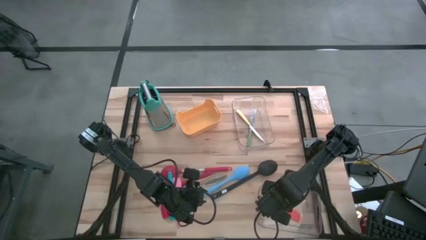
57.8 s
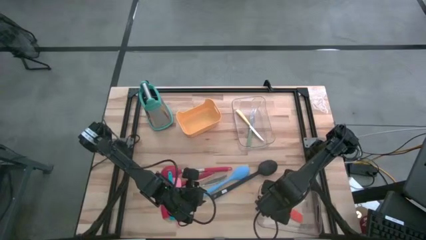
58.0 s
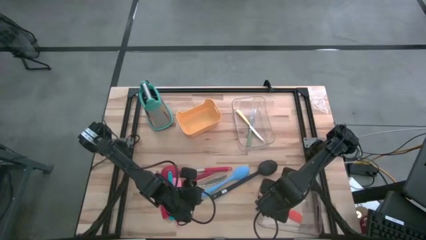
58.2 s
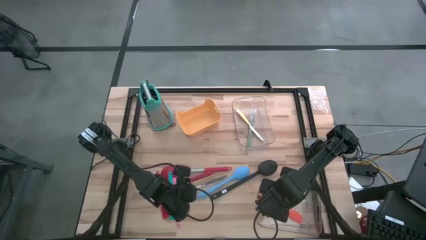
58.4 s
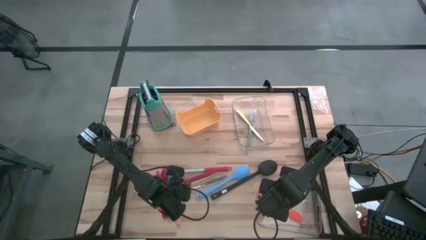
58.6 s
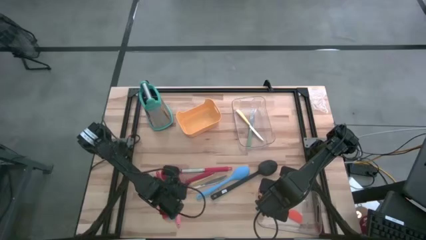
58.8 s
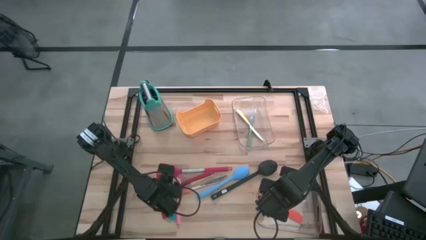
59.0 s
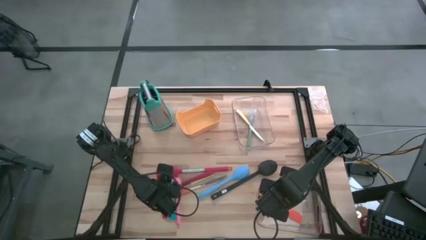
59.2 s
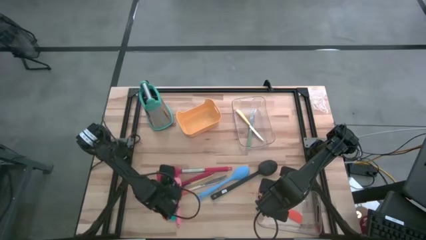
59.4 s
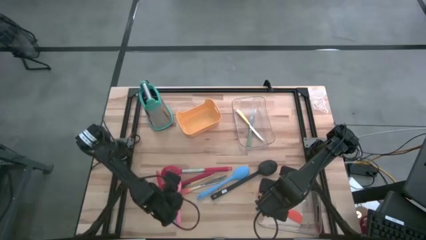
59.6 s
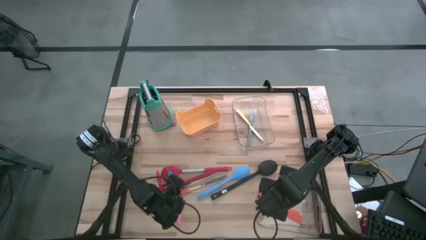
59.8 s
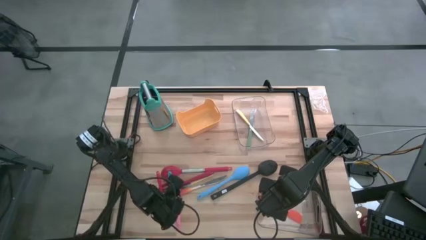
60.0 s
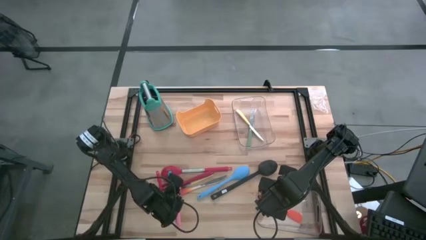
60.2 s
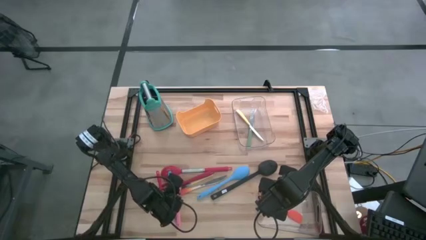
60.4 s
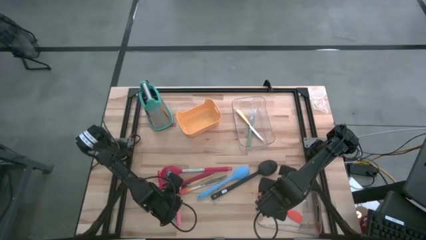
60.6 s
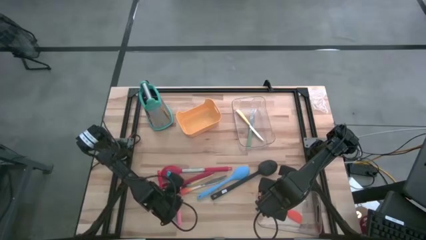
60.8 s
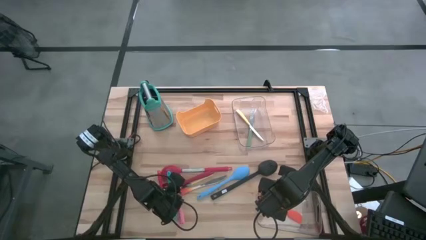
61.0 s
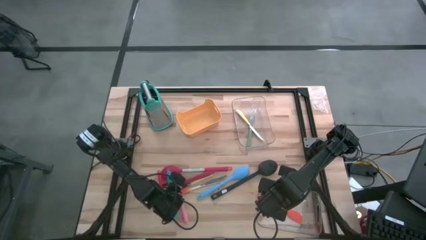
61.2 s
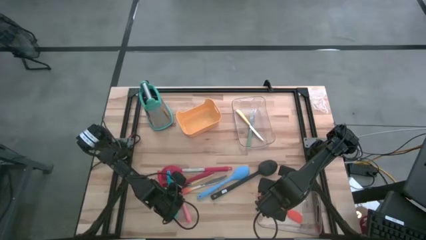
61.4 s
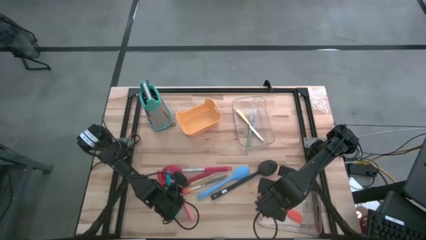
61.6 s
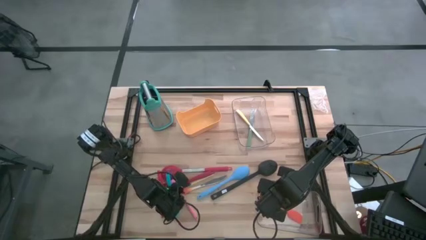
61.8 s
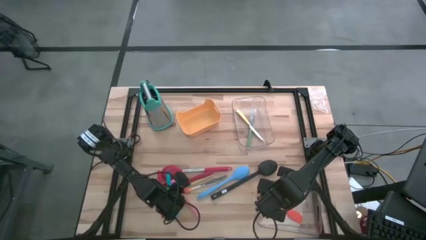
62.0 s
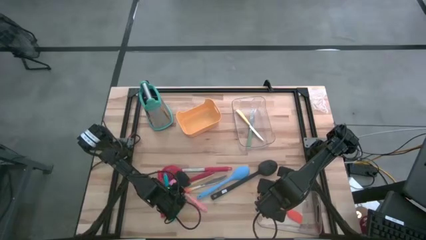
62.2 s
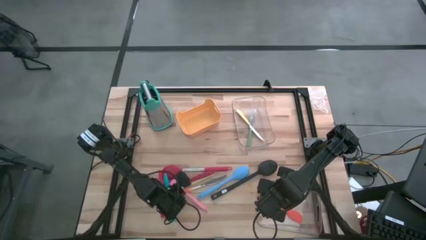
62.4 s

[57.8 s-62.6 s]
Task: Pick & Place Kitchen Items
Put the pink spatula into the bottom transparent bin

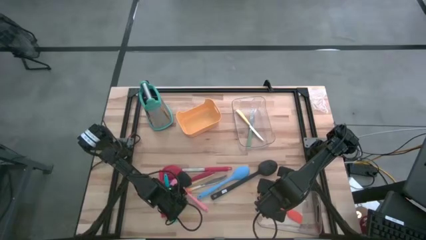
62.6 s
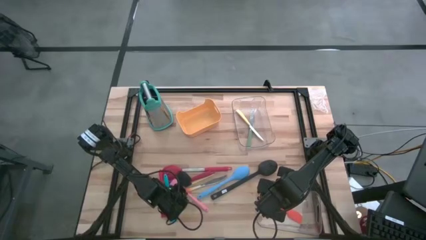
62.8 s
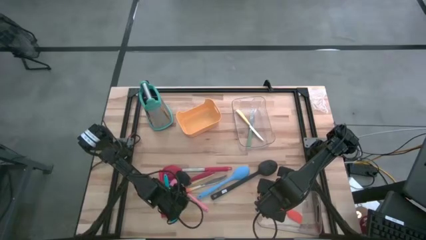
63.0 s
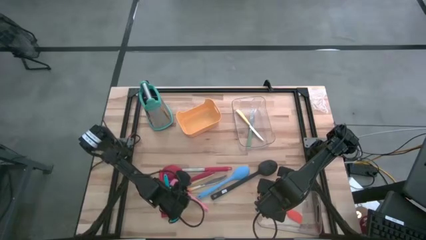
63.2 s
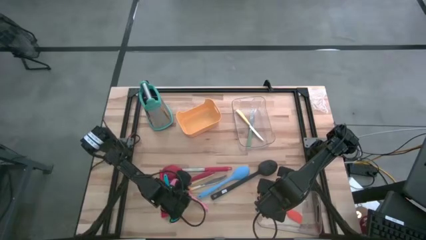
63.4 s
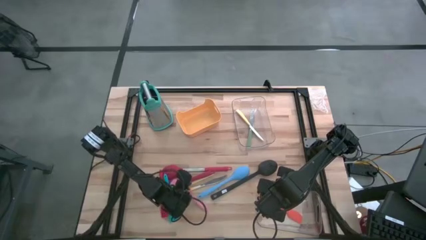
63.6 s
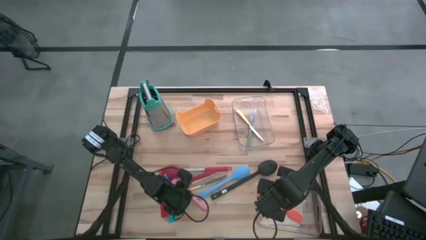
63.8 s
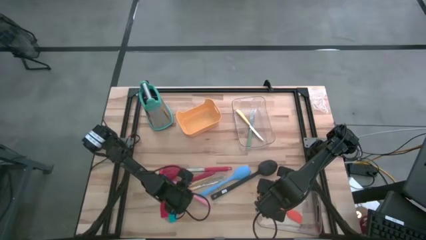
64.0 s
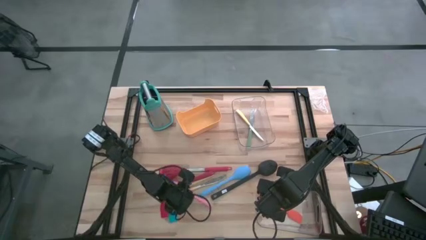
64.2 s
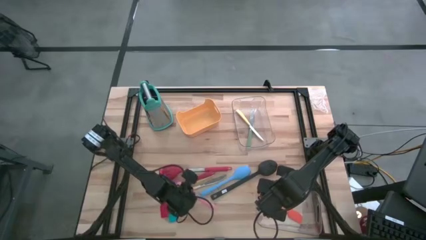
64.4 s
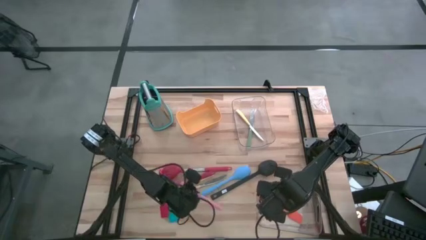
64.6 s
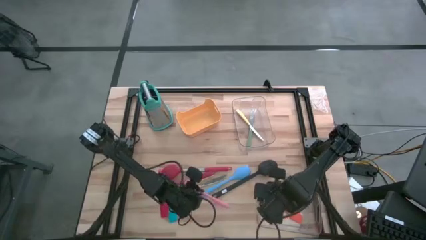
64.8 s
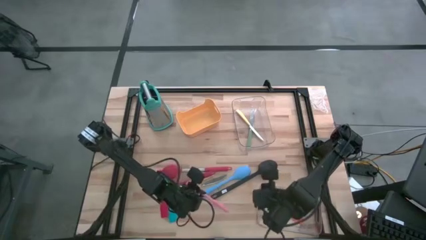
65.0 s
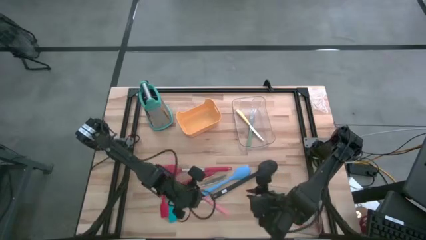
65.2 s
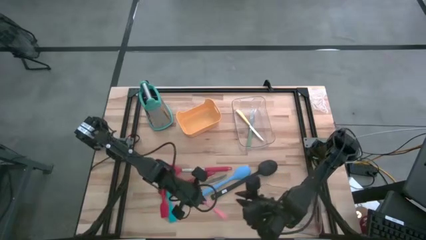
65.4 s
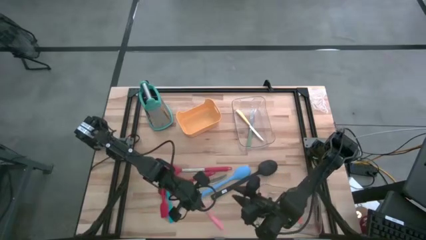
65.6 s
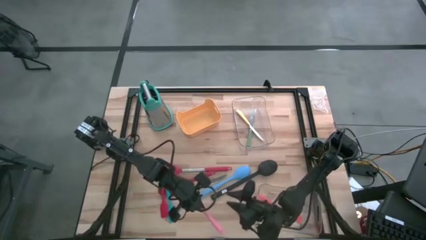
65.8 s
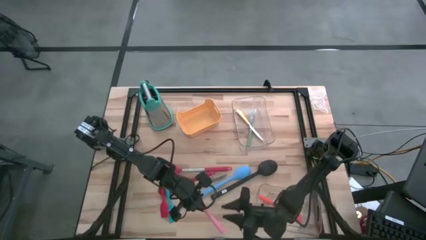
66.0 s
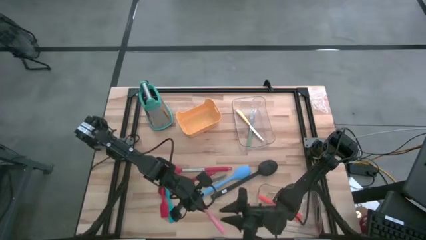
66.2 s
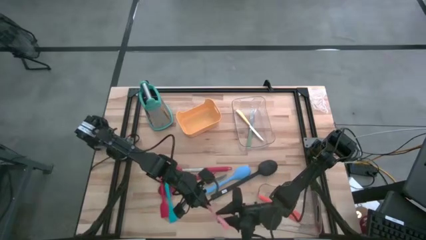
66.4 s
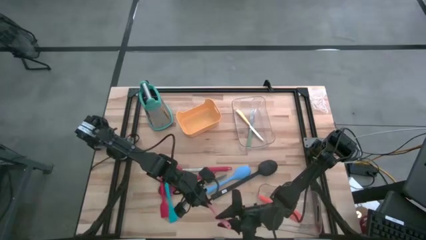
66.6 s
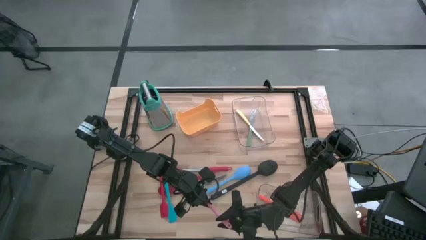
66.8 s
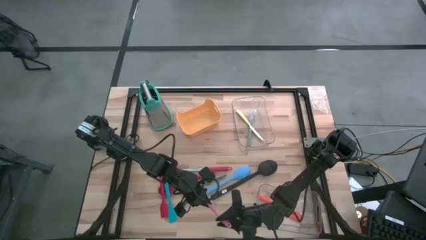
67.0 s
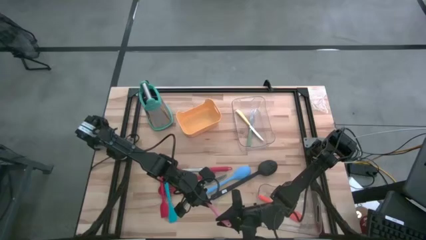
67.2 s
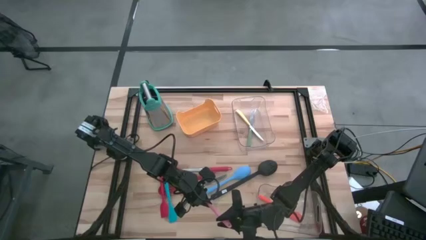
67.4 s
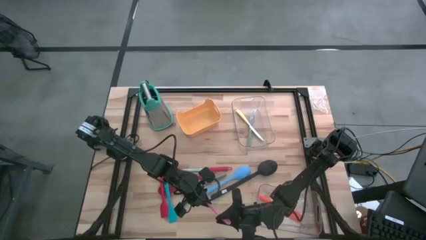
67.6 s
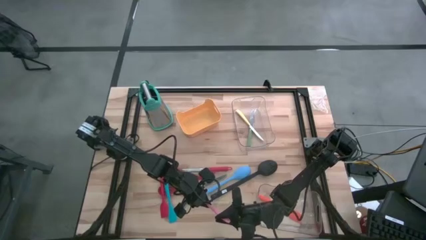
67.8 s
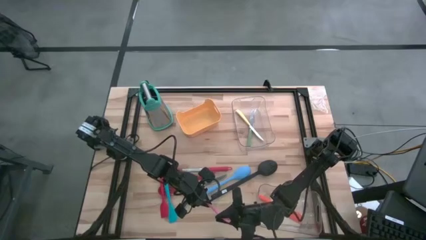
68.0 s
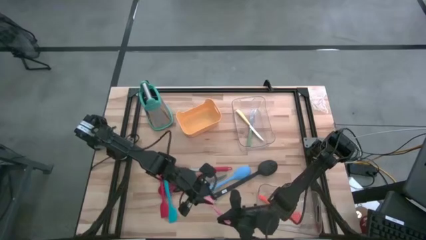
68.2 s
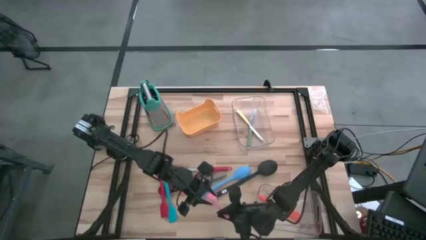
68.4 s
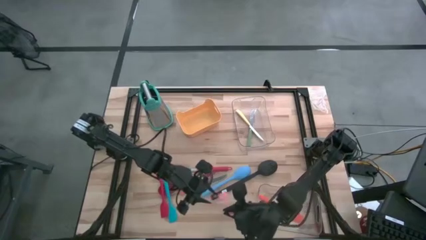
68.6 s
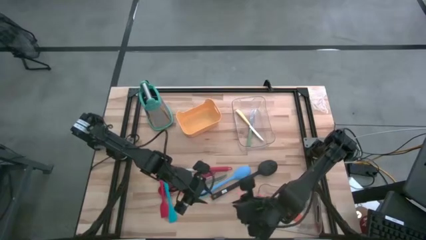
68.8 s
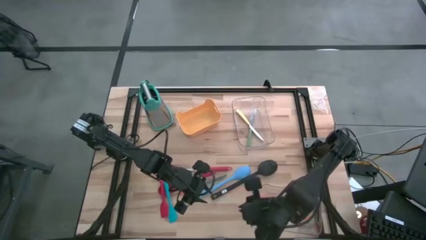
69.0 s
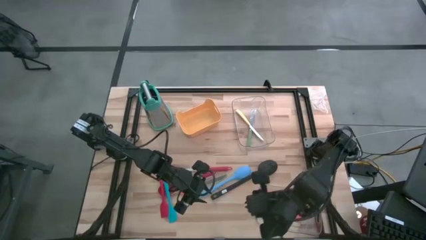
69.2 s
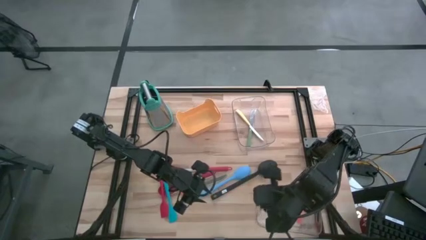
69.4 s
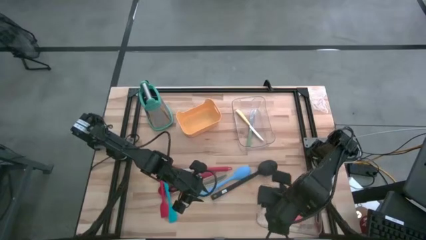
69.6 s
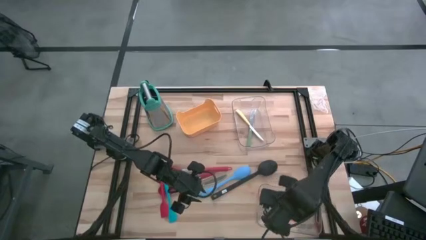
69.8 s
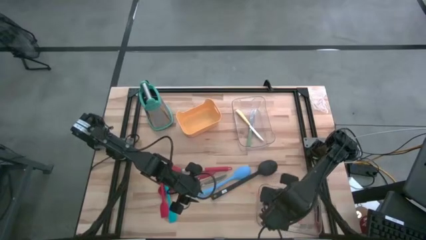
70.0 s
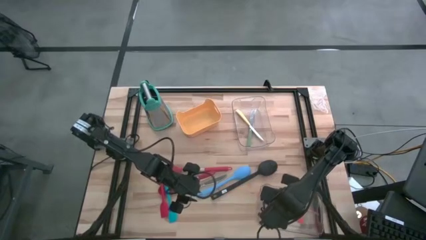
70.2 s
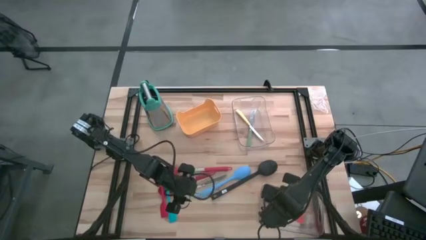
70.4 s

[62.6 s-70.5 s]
Put the pink spatula into the bottom transparent bin

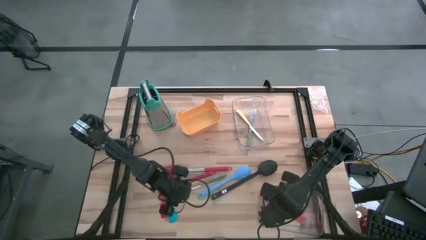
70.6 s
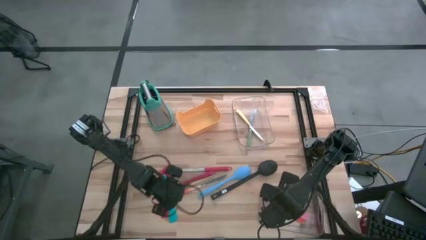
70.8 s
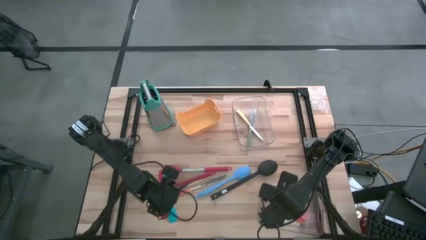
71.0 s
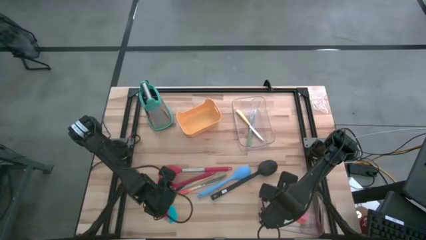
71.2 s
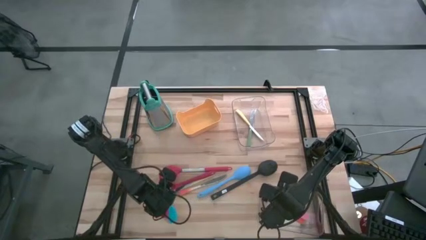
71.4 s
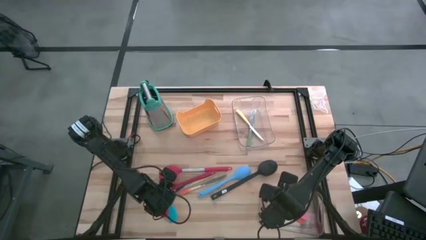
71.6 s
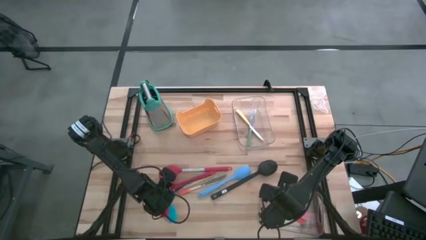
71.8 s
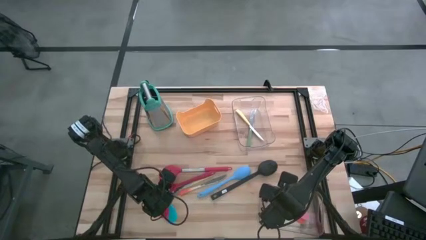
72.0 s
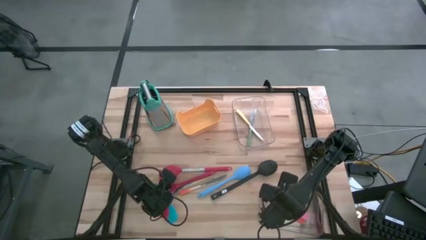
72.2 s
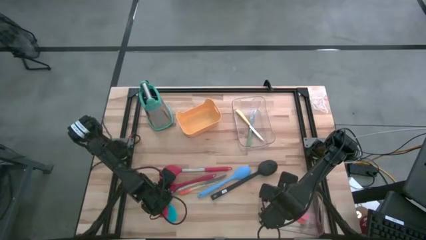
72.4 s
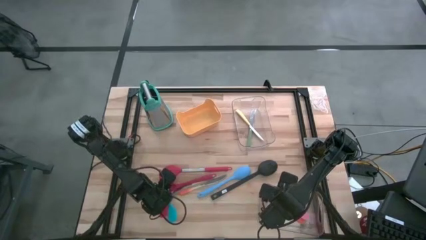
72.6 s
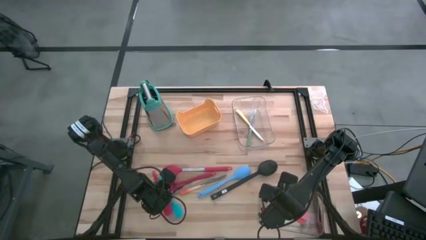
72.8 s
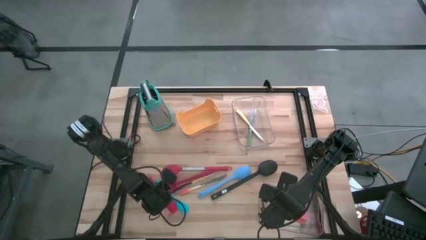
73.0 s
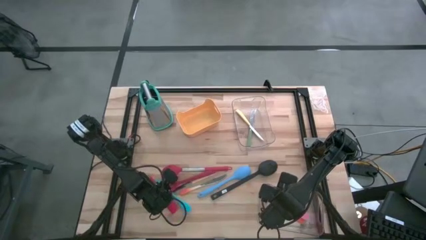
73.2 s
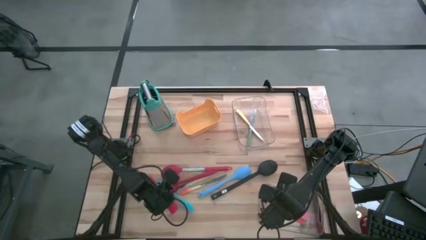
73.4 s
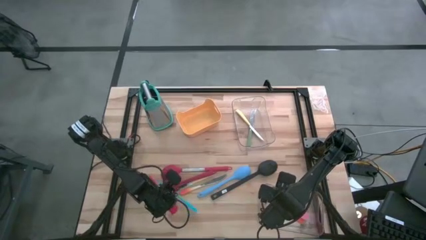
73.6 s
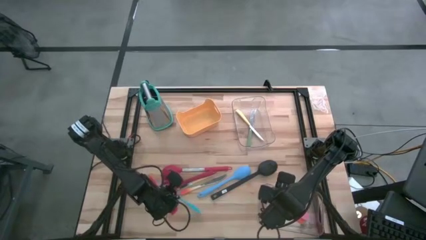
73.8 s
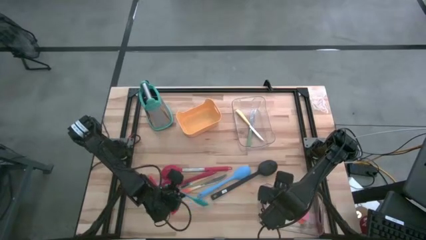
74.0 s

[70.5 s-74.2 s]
Put the sky blue spatula into the bottom transparent bin

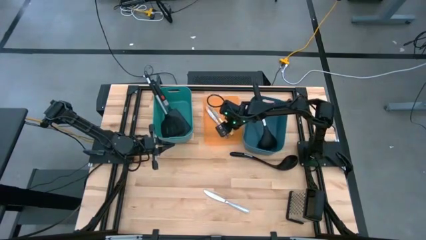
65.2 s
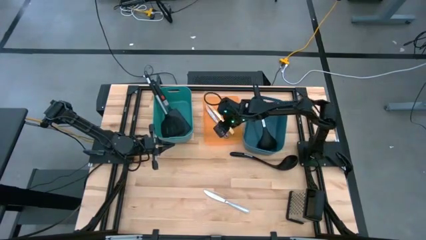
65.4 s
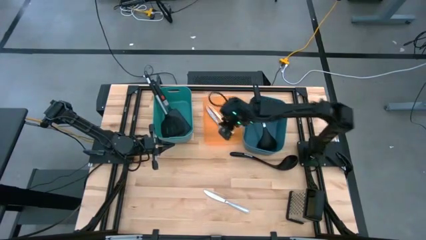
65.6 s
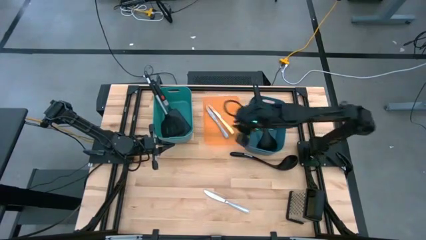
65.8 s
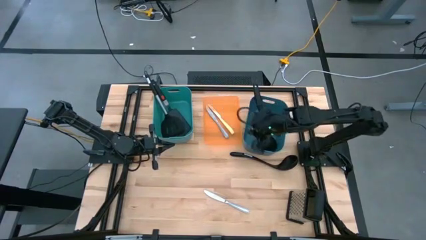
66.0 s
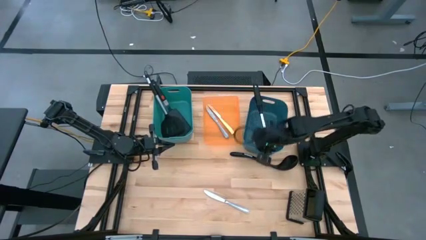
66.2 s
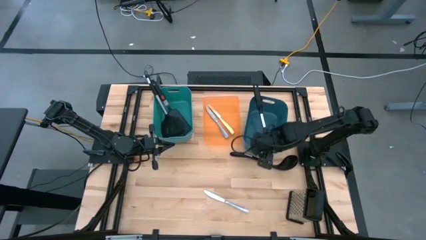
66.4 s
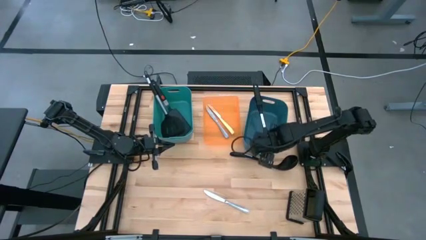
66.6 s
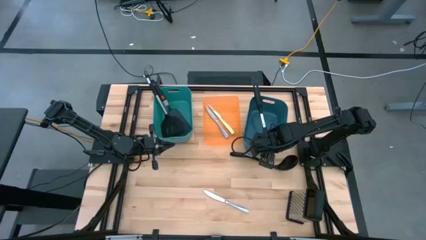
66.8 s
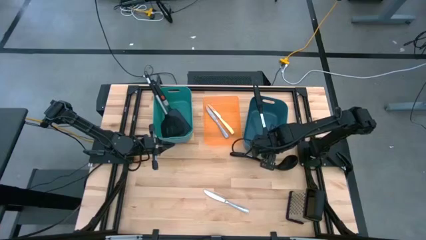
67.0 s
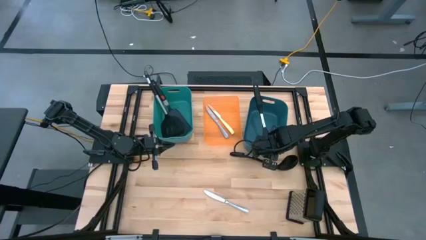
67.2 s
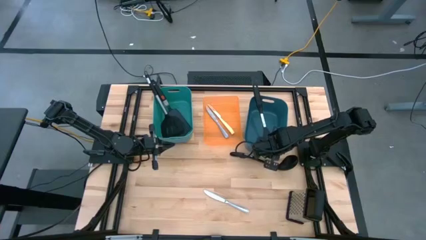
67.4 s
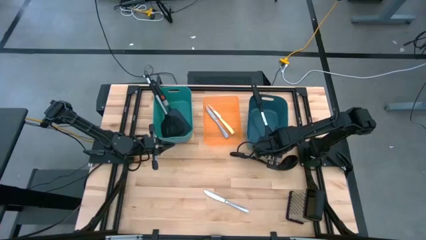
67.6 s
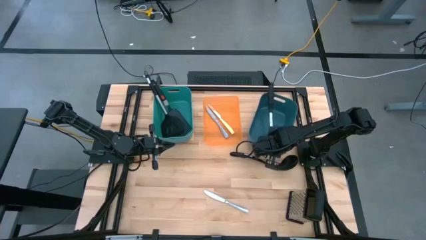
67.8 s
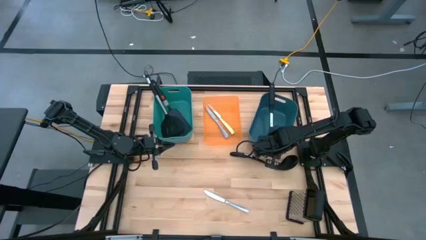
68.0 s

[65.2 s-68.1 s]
Task: Pick & Place Kitchen Items
Adjust the dark blue bin
